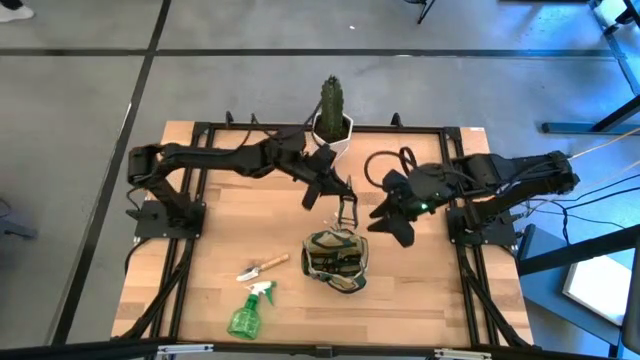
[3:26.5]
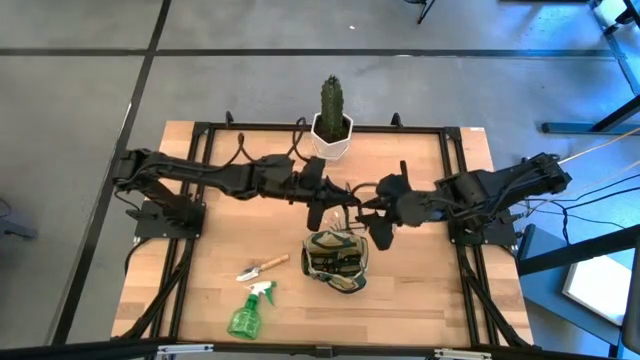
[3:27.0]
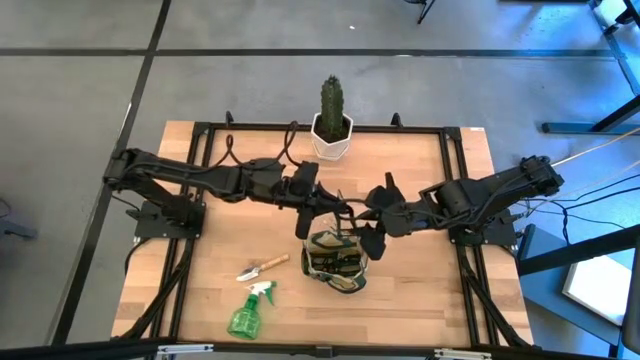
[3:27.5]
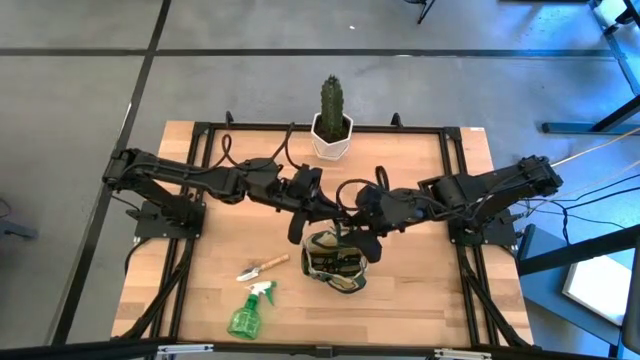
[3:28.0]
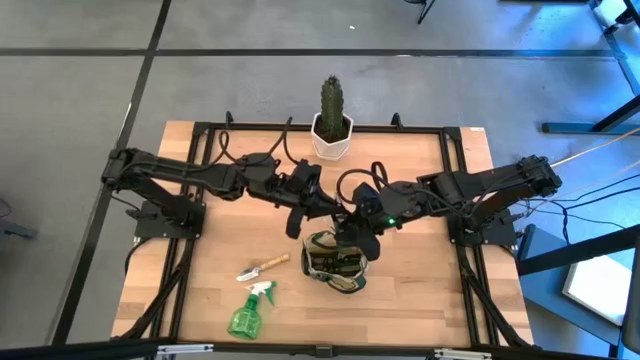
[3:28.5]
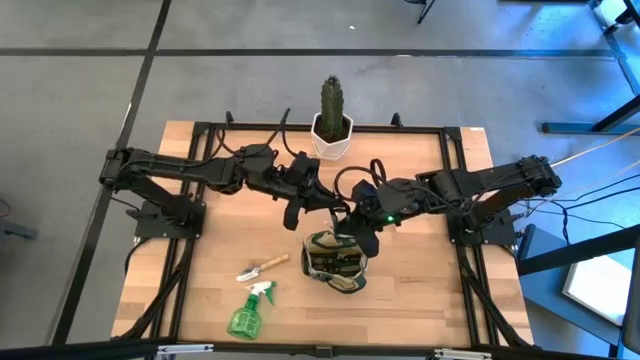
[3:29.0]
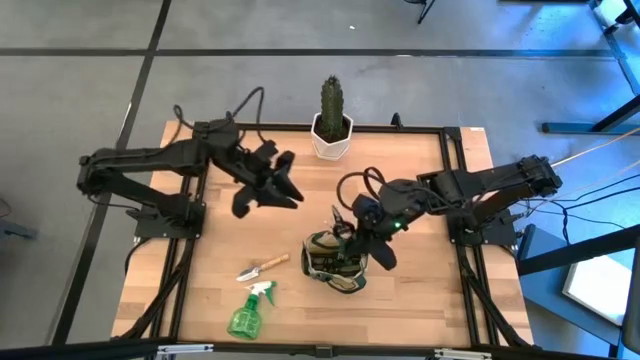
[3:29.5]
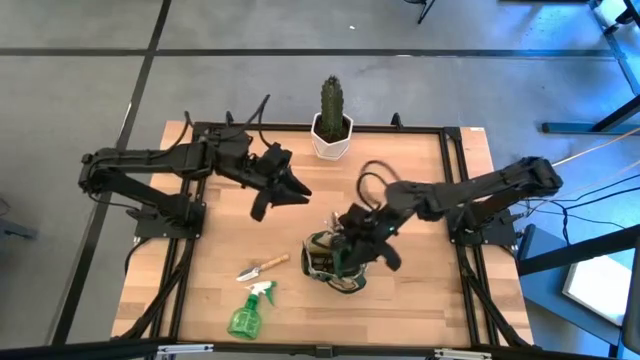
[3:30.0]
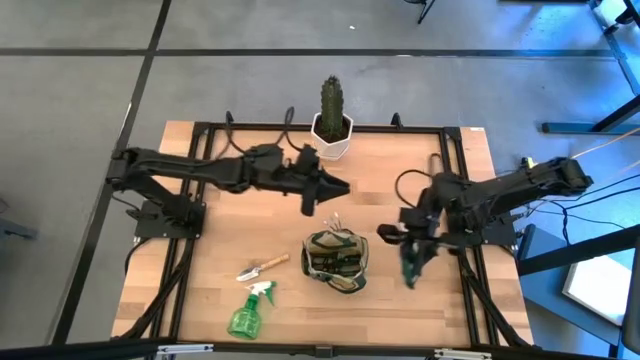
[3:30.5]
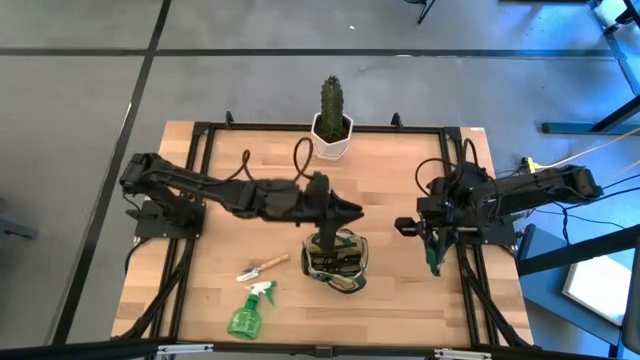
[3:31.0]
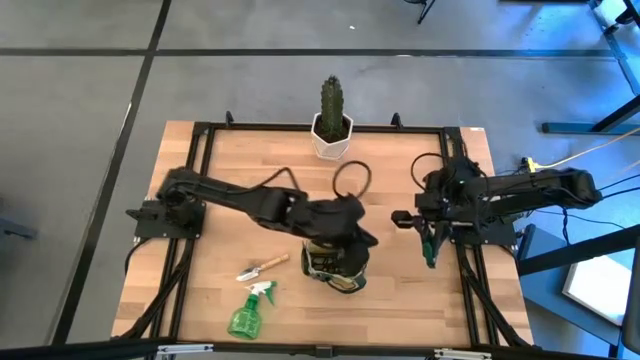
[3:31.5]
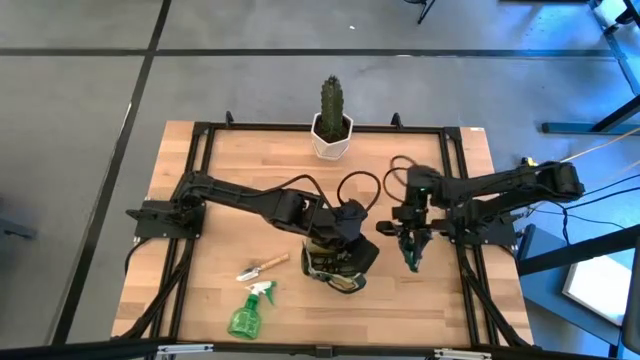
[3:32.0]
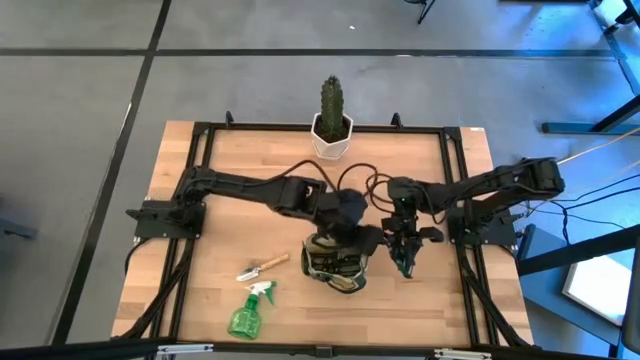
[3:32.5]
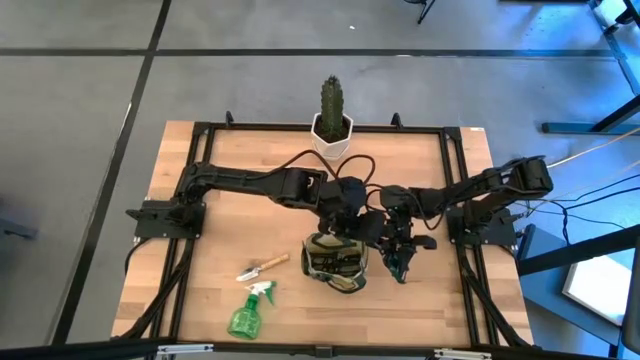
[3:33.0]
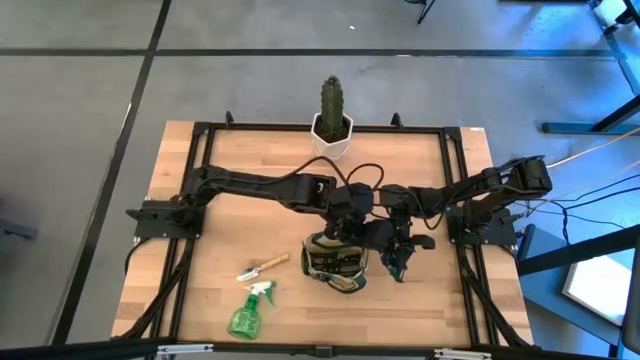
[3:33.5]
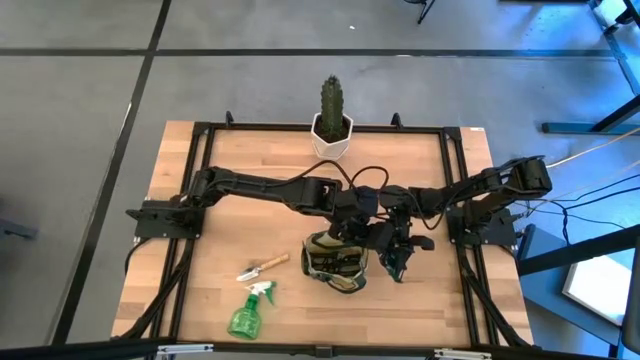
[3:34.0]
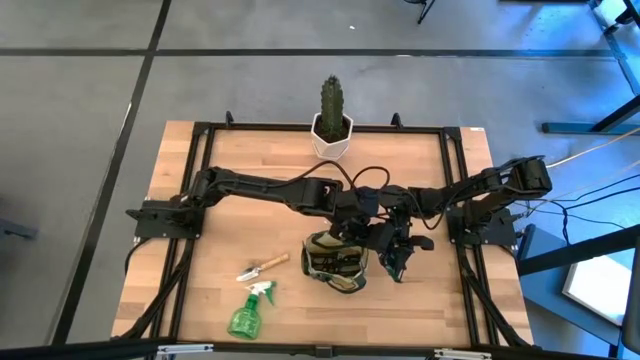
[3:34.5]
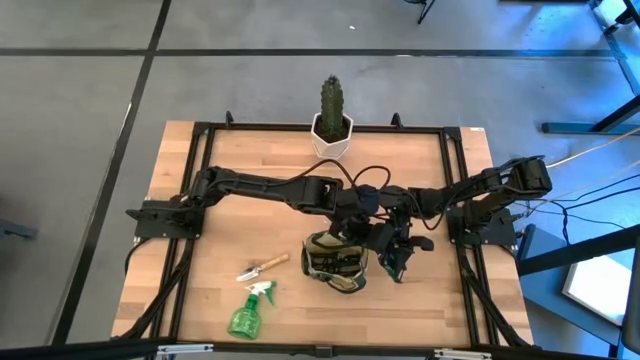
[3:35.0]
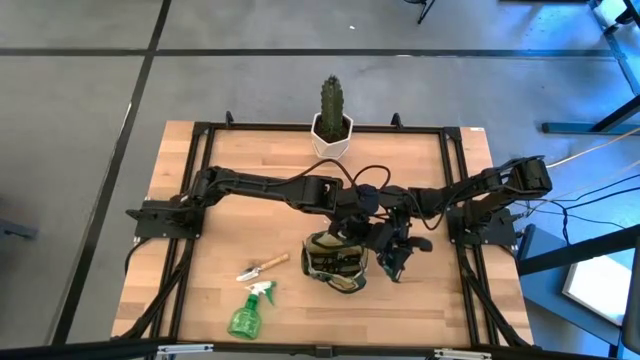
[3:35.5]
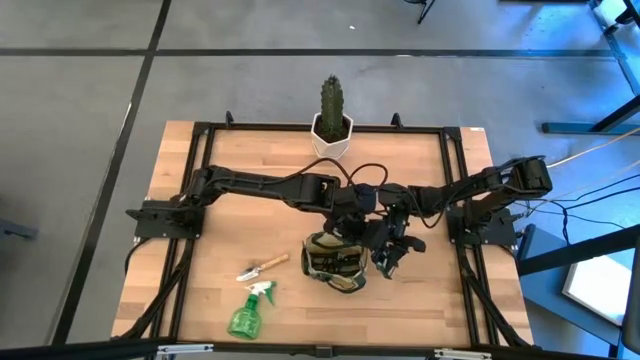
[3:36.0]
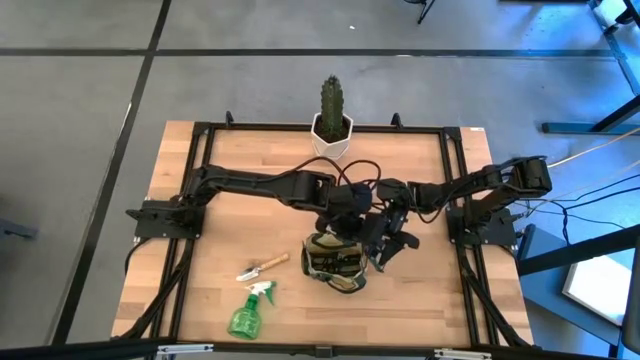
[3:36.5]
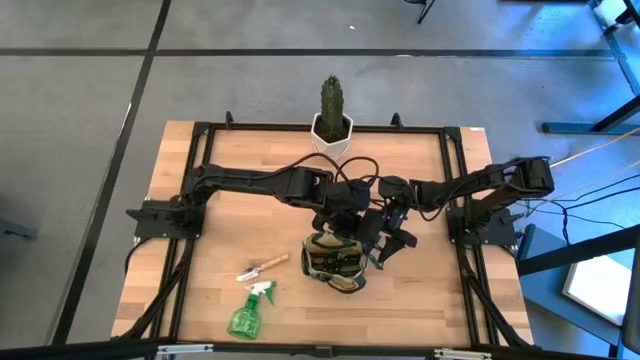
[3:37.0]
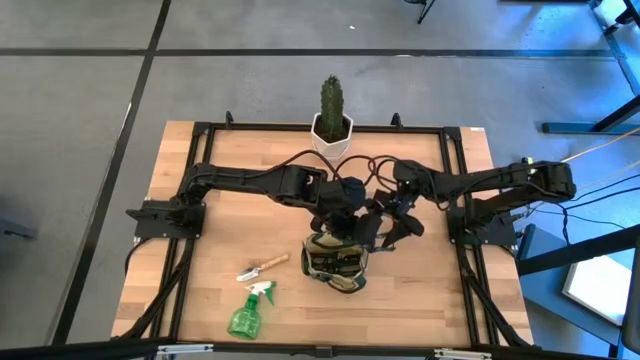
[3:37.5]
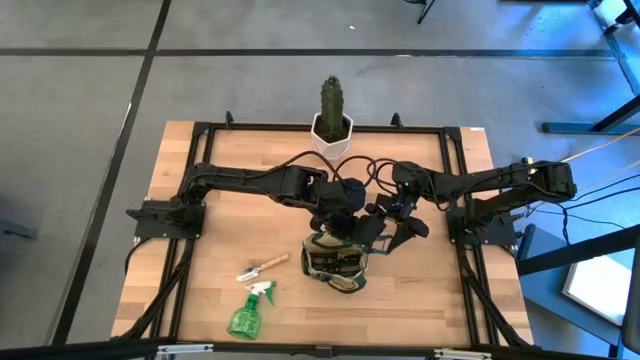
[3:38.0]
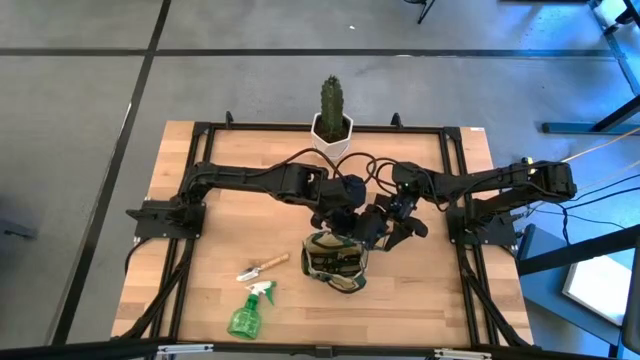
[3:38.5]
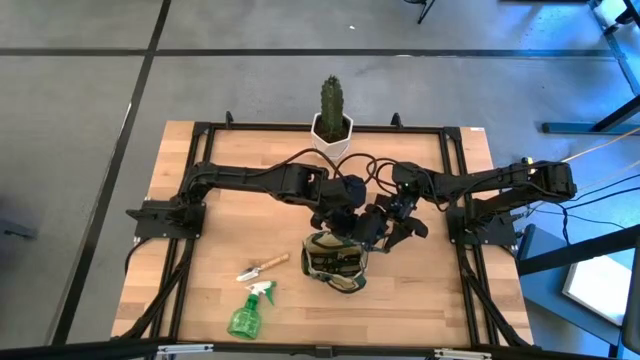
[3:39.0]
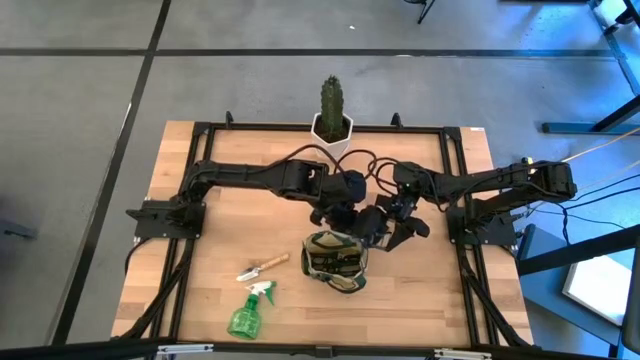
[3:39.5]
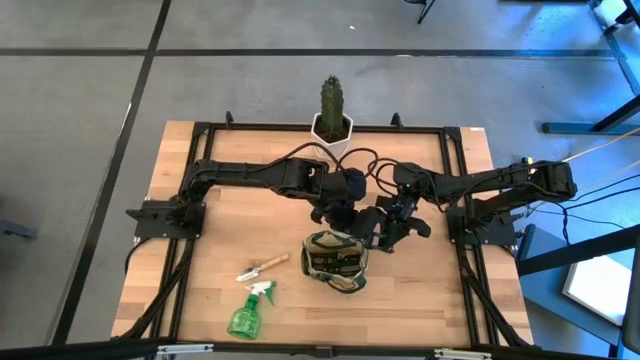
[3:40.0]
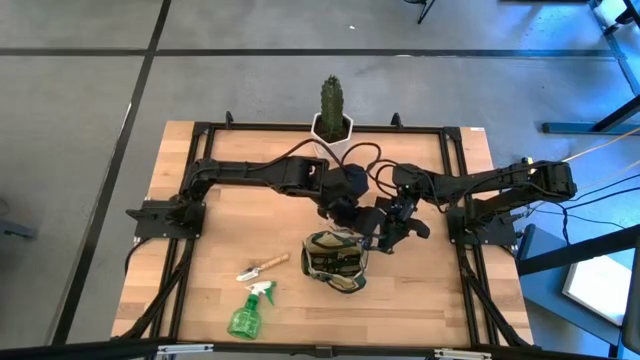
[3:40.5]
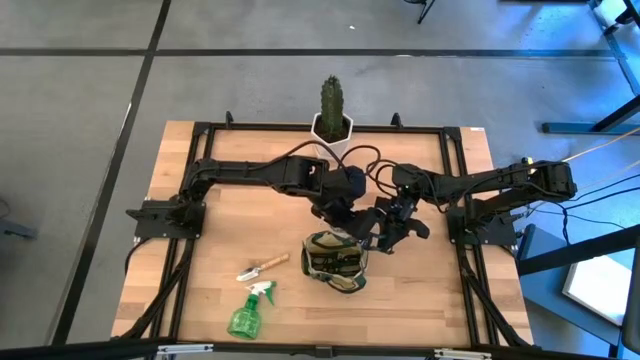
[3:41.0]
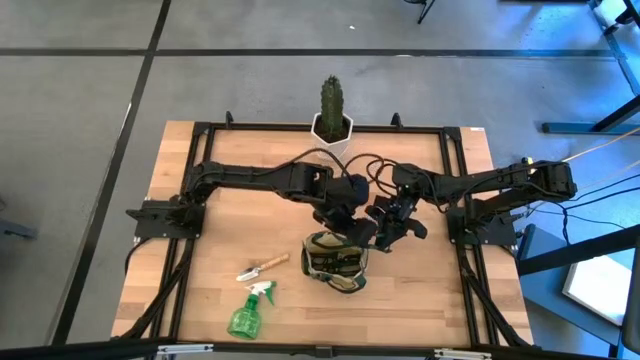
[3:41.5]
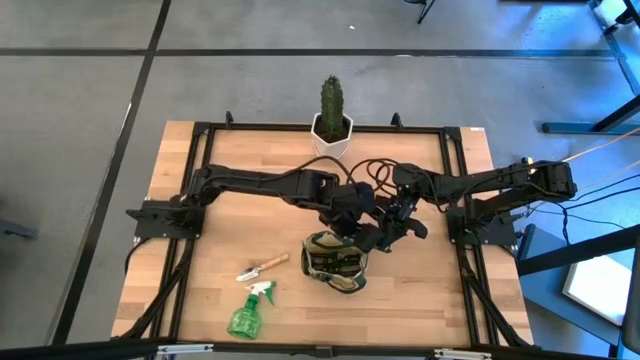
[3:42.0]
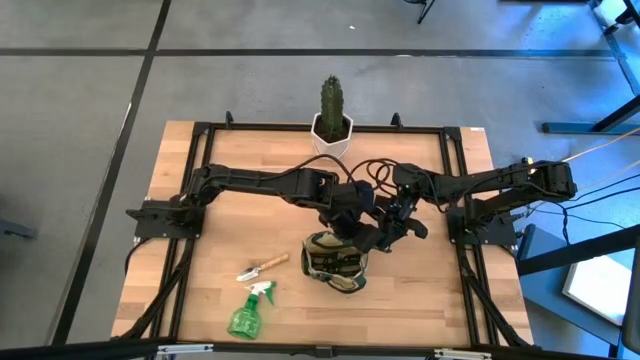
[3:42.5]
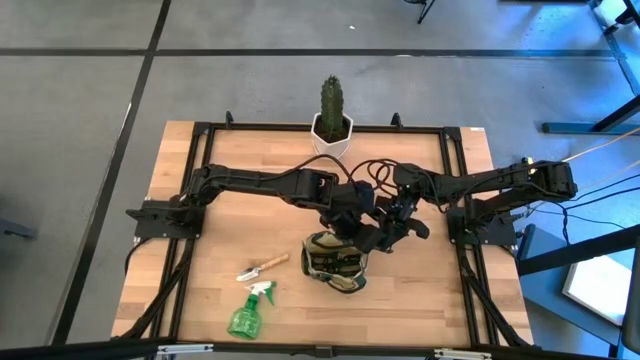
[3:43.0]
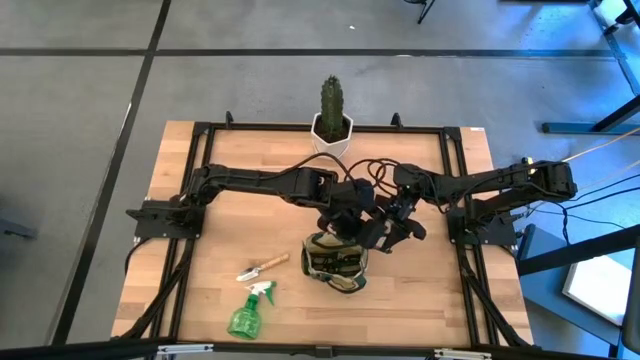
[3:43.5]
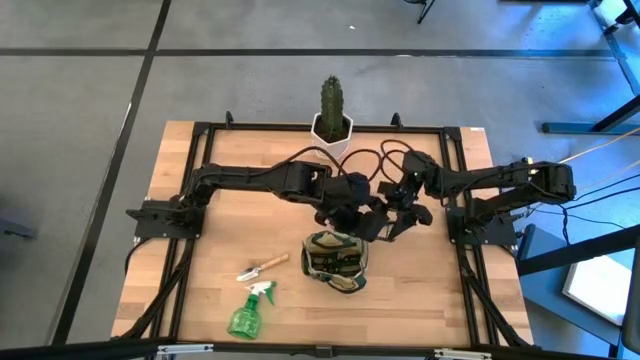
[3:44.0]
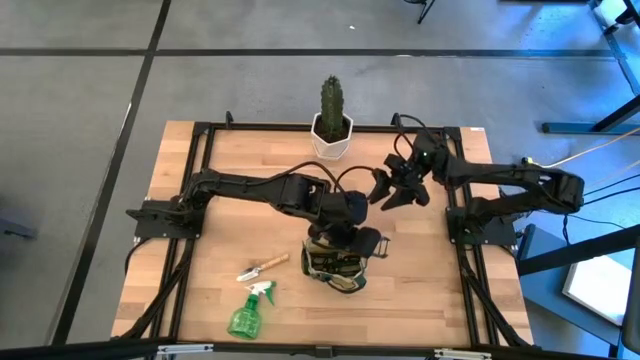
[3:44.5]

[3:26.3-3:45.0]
Task: Pick & Place Garden tools in Gardening bag
Put the green fruit pruner into the green gardening bag

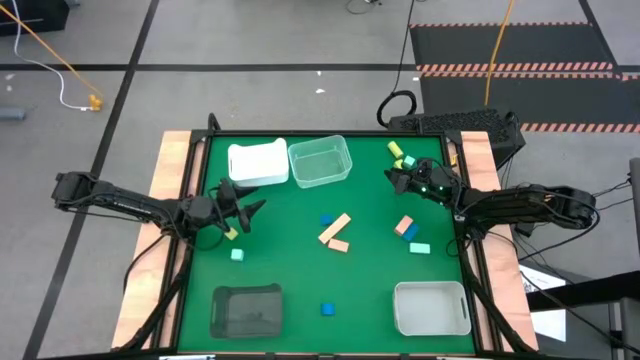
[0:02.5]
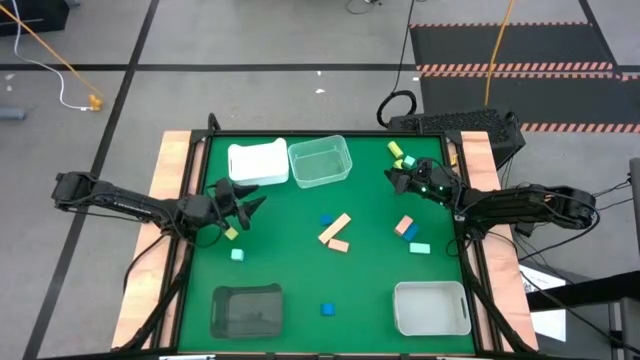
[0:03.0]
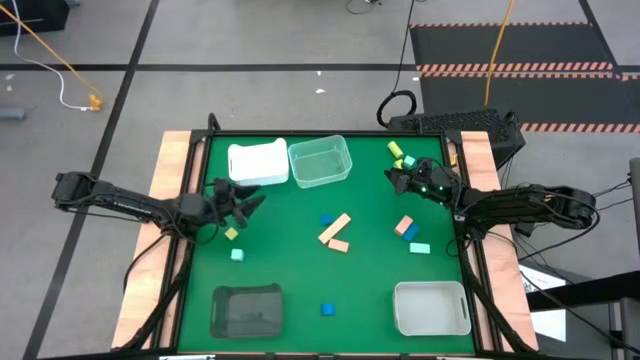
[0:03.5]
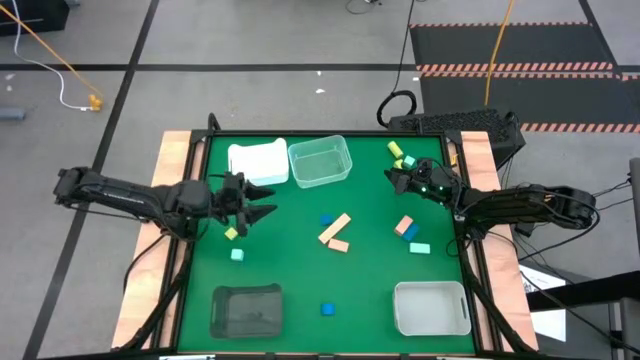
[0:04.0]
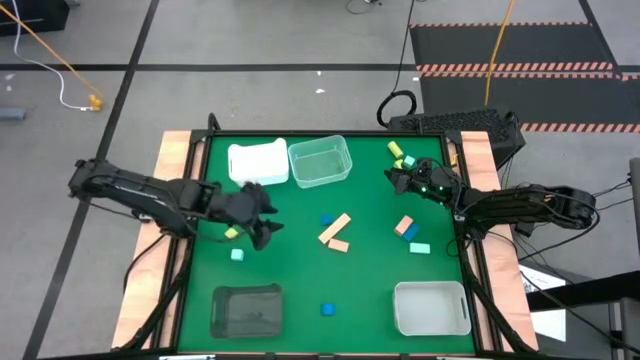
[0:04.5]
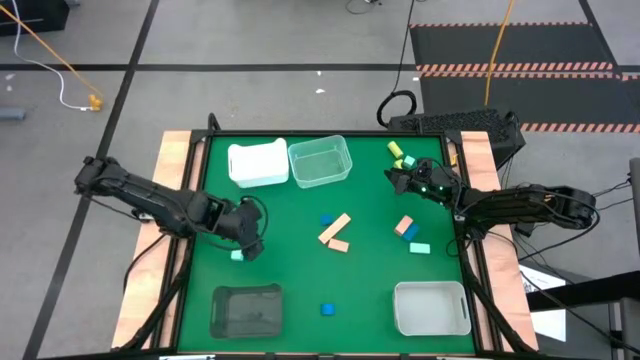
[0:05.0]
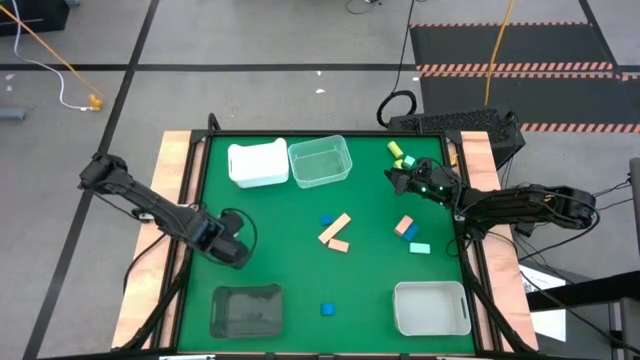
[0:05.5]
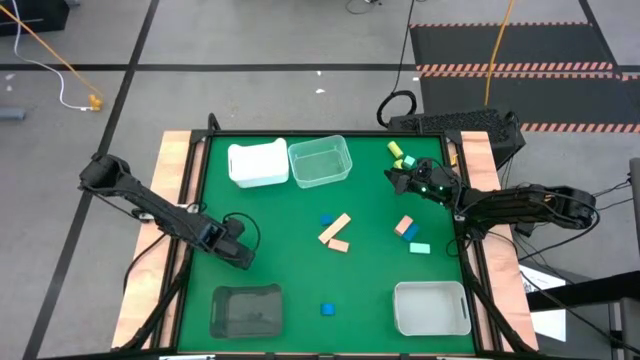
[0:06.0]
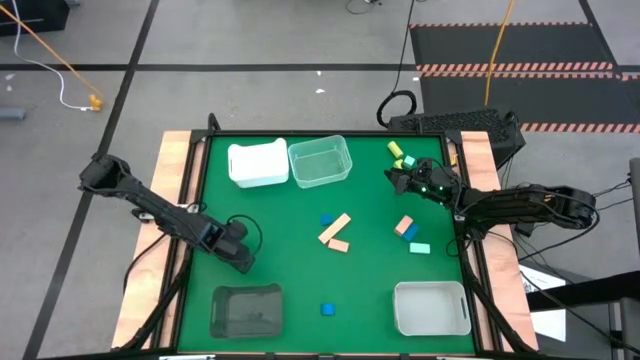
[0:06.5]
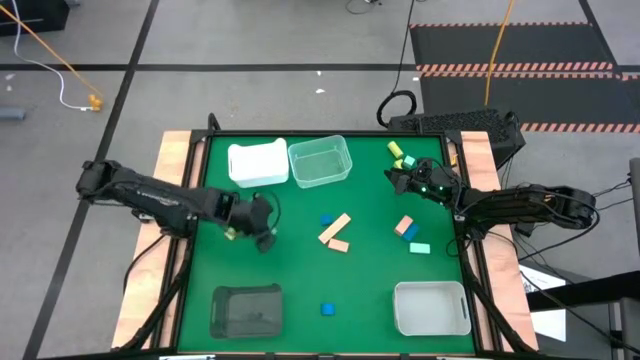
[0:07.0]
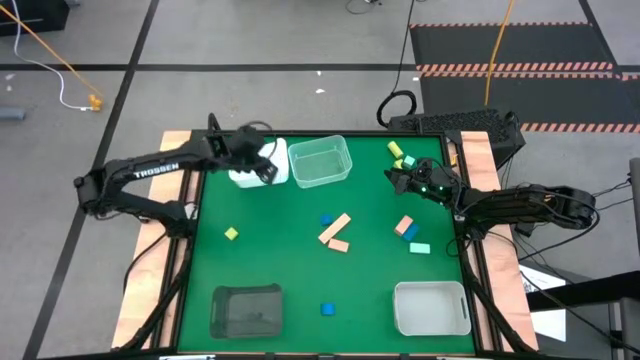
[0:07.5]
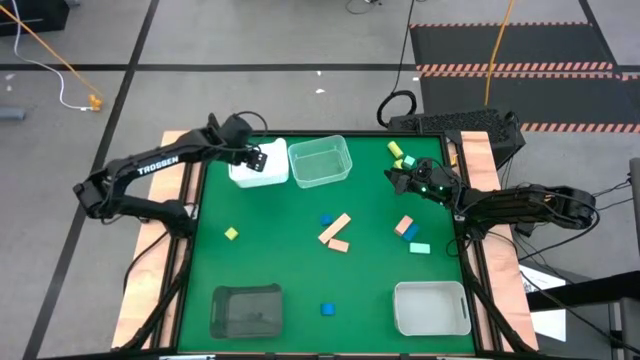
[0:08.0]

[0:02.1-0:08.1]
Task: Sort & place blocks by color
Put the bottom left white blocks into the white bin
